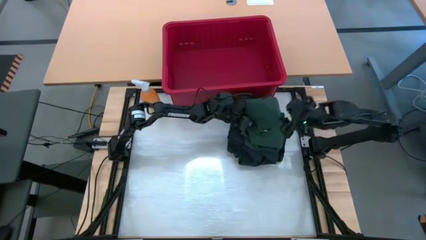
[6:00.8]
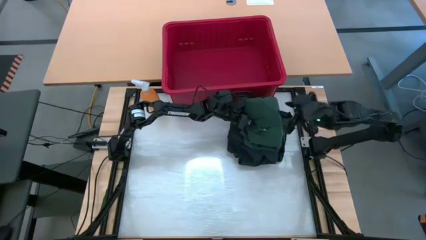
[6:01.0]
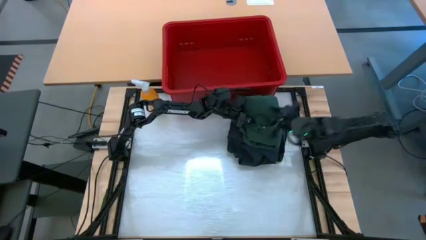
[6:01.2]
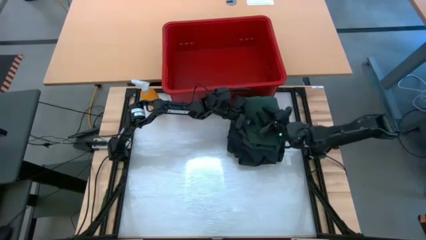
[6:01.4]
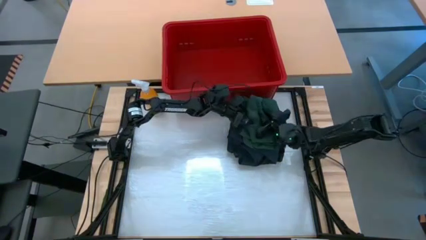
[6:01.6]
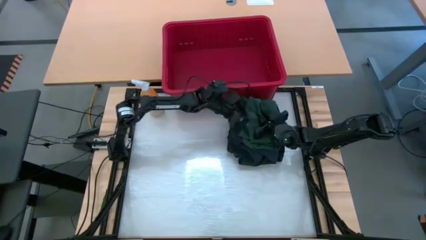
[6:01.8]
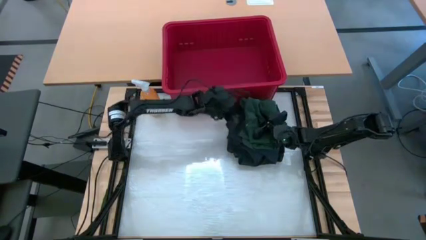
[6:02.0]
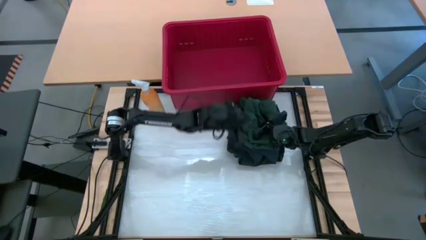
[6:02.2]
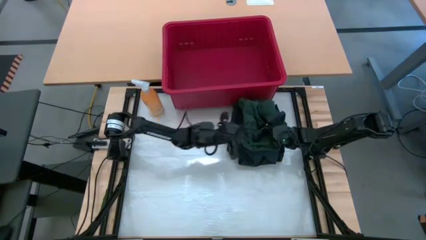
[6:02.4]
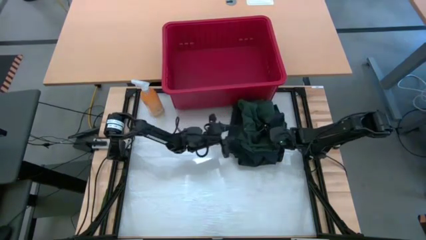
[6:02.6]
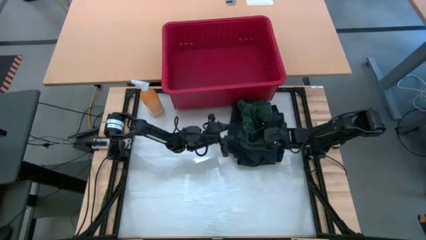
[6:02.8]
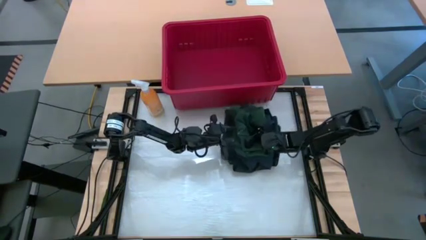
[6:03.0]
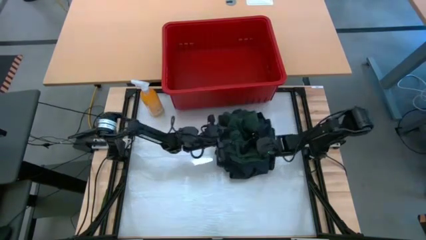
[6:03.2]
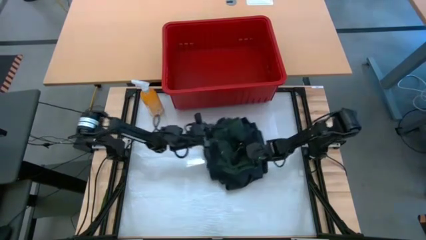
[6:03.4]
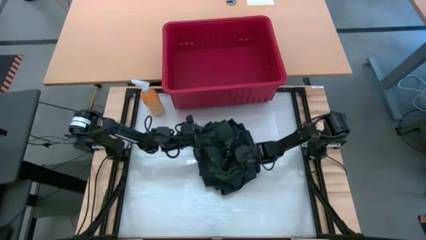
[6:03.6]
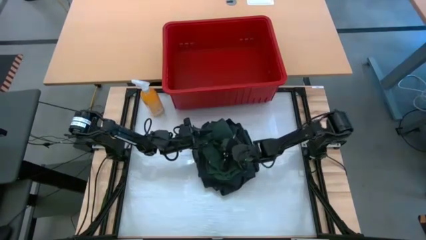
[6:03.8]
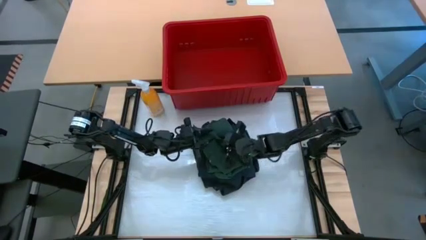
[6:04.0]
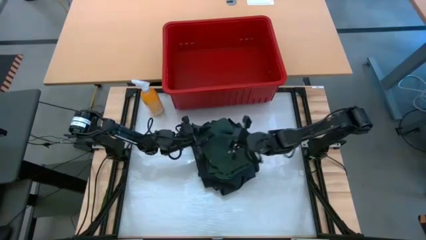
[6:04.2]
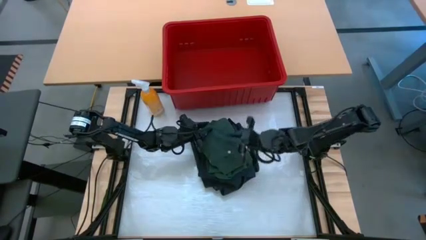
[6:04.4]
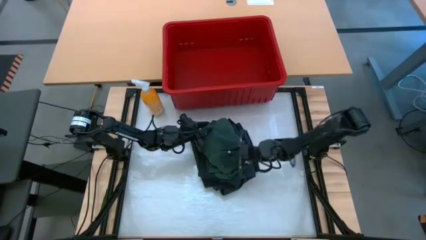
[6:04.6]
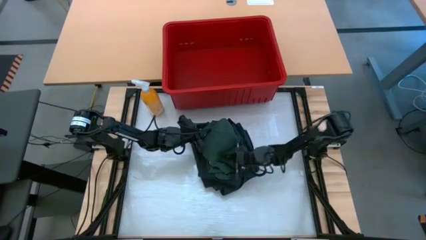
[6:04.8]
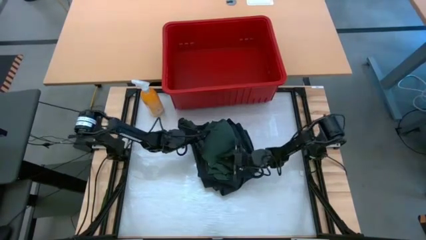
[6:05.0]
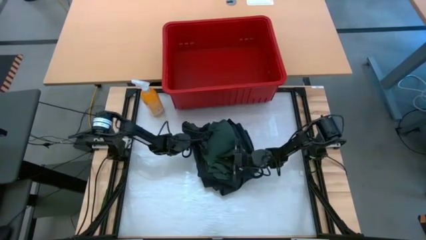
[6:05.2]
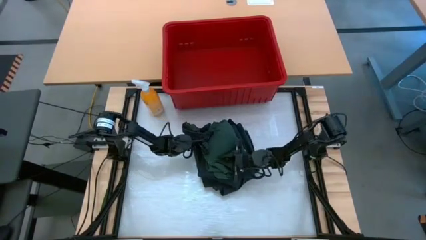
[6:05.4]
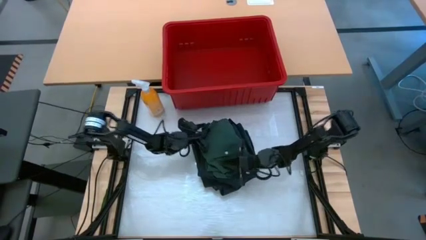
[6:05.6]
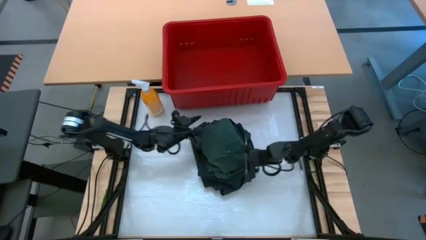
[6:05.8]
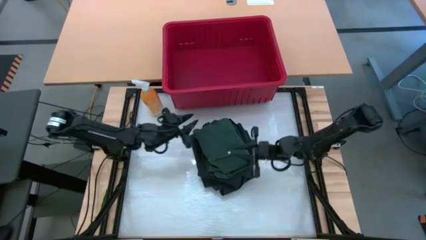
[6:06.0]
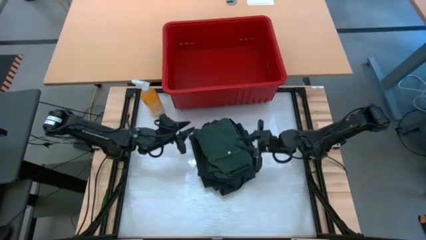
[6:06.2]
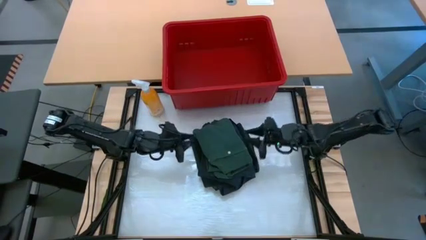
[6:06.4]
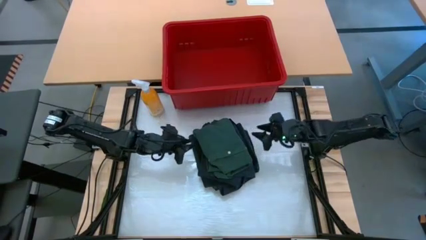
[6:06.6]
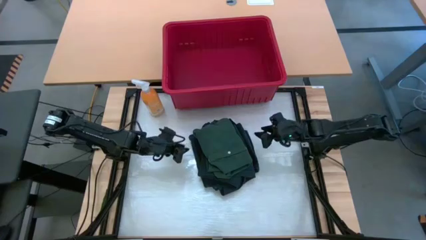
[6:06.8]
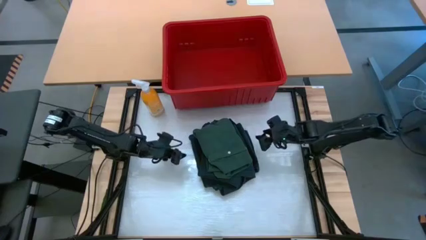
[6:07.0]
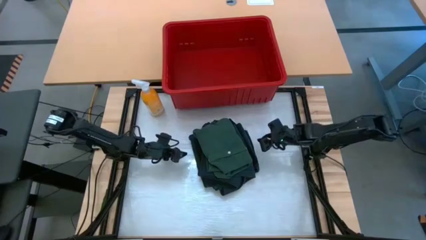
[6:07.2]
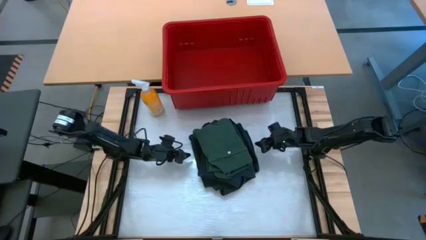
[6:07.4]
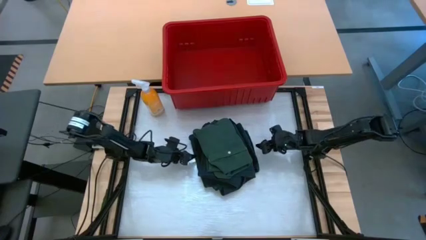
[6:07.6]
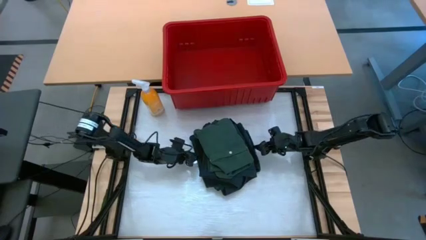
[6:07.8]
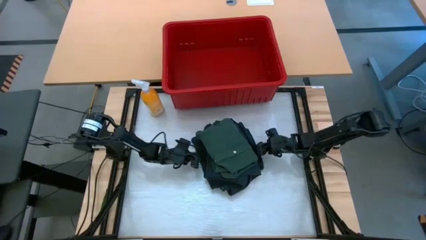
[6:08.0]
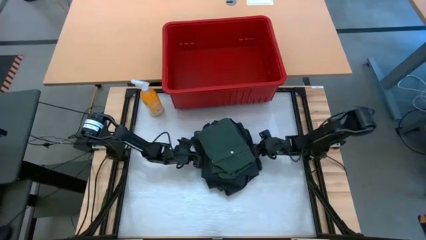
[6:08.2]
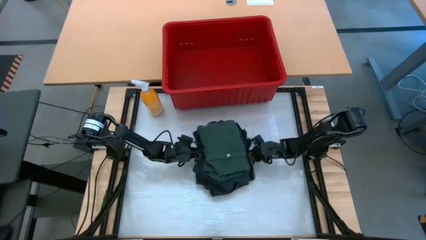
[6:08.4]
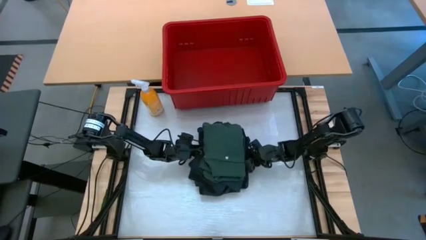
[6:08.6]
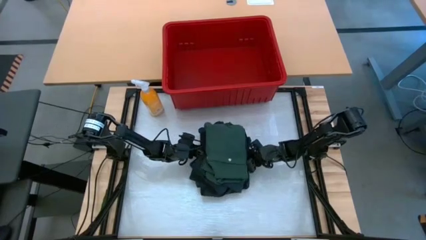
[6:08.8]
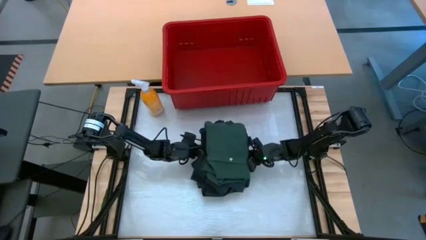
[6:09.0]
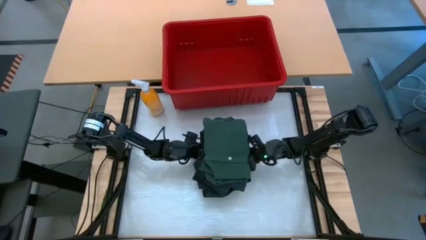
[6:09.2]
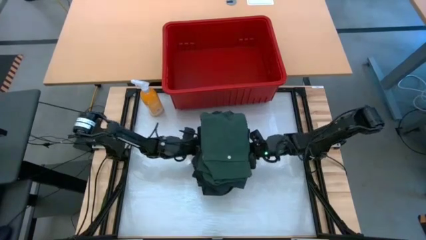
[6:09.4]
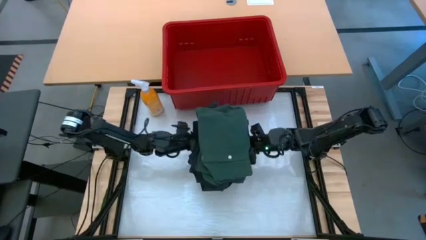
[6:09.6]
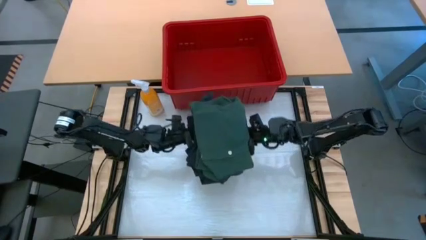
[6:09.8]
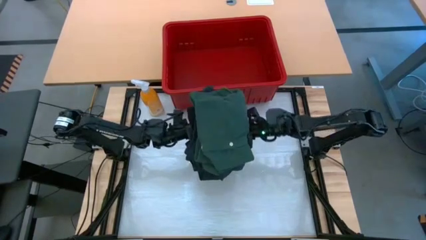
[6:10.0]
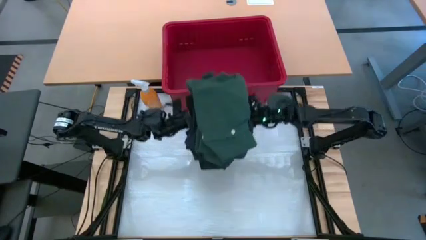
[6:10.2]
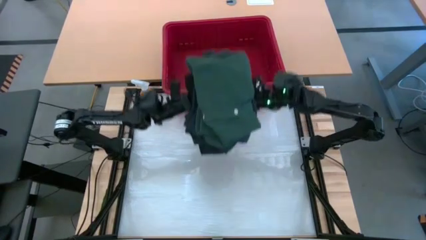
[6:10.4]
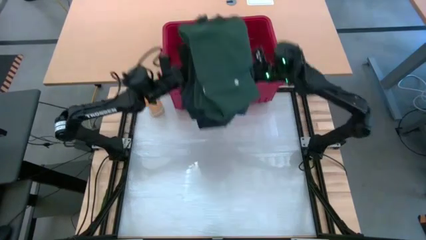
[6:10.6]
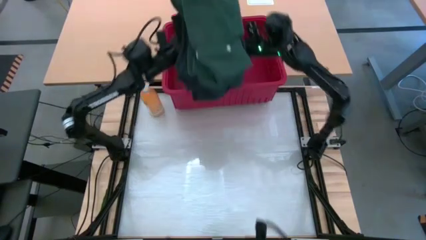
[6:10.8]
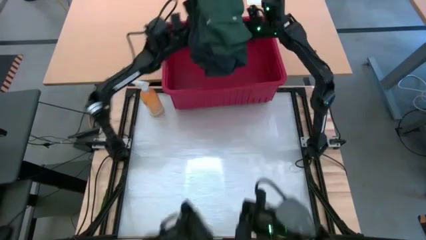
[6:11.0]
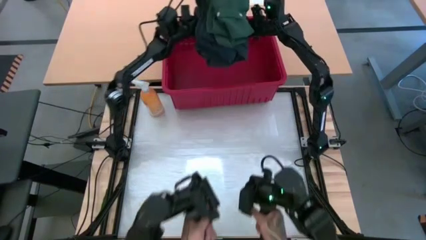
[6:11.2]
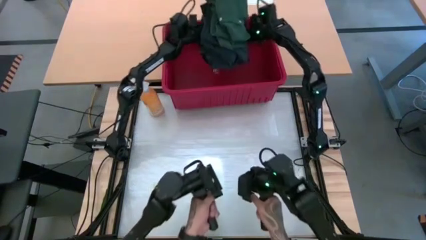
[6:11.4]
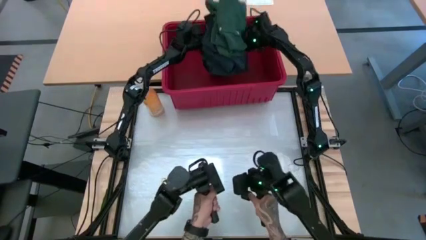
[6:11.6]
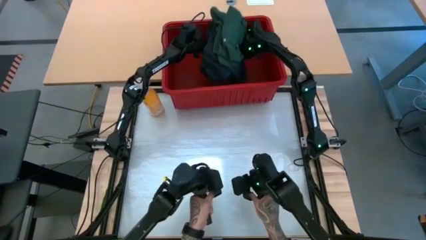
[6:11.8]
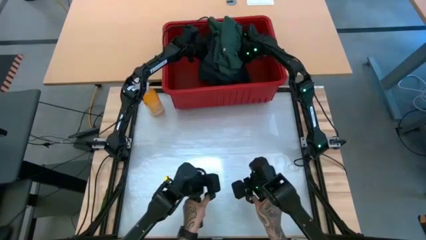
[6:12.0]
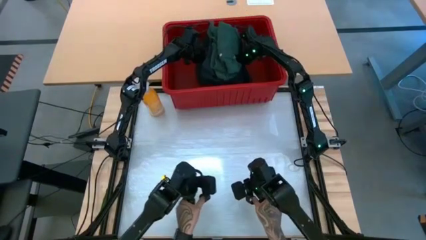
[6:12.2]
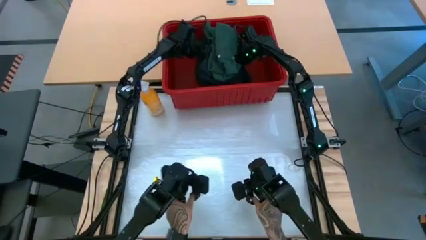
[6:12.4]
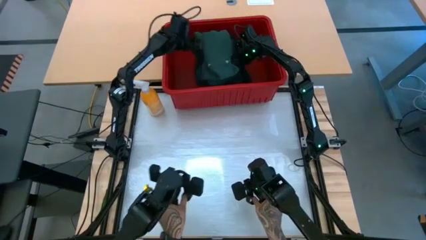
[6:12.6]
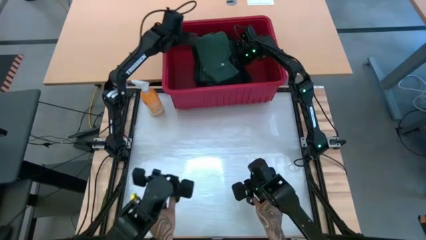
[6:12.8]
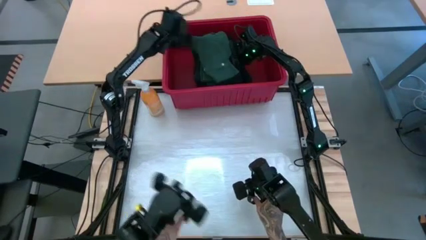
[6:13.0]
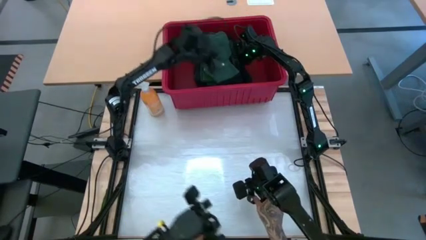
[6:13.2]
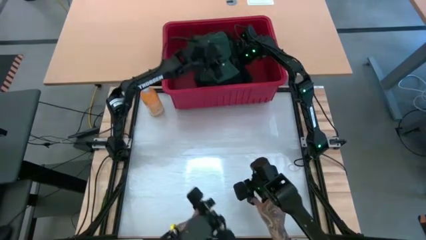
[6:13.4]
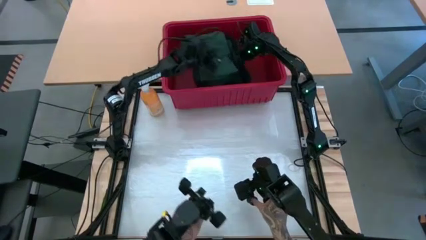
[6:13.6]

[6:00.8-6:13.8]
Task: Fold Laundry from Bin
Put the folded clothes into the red bin
